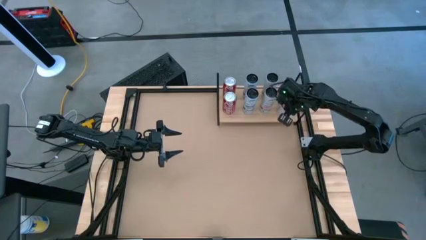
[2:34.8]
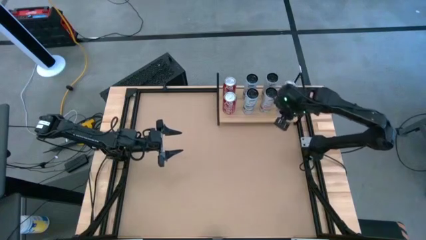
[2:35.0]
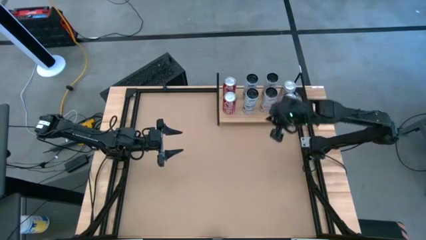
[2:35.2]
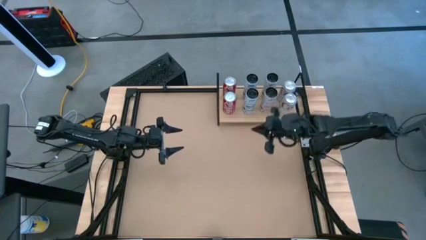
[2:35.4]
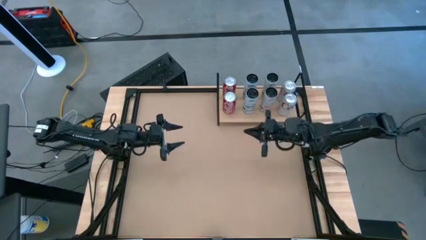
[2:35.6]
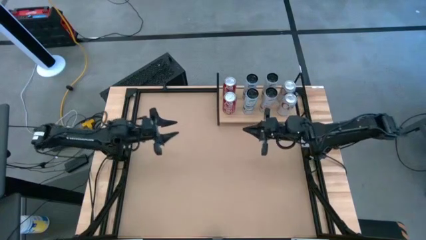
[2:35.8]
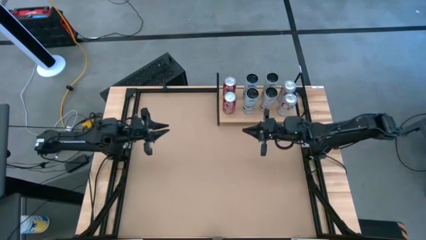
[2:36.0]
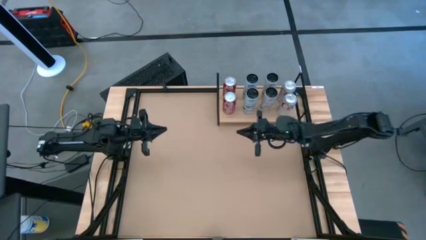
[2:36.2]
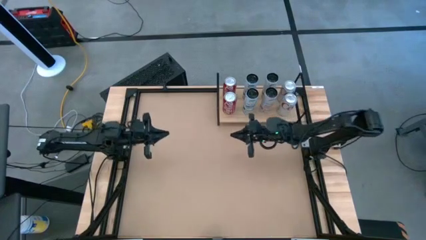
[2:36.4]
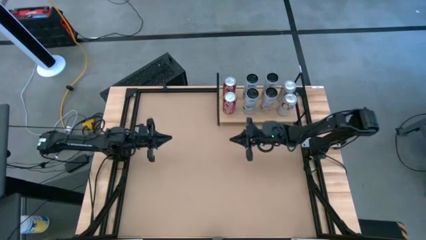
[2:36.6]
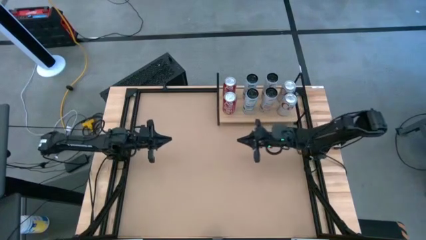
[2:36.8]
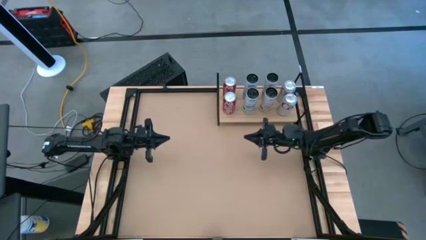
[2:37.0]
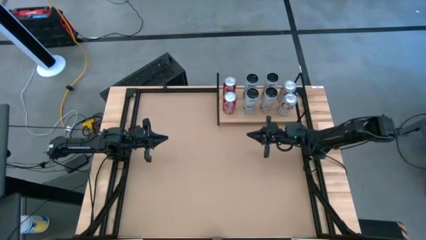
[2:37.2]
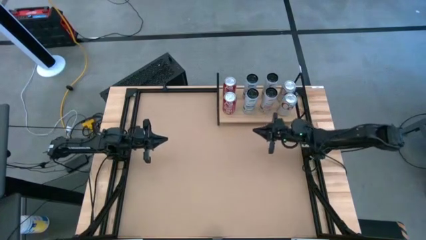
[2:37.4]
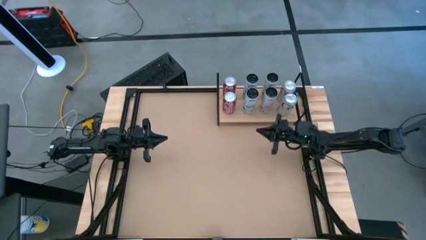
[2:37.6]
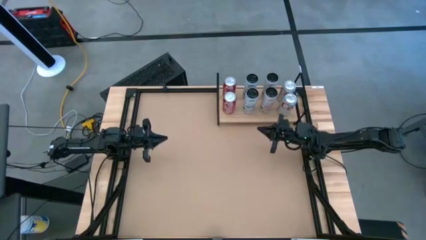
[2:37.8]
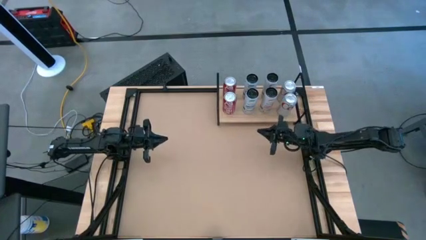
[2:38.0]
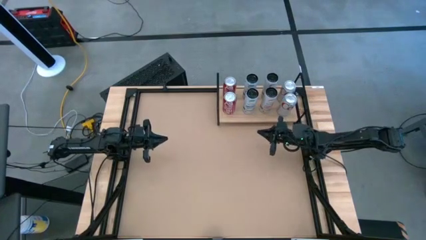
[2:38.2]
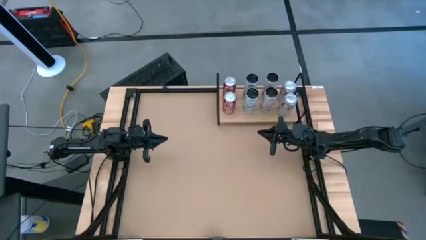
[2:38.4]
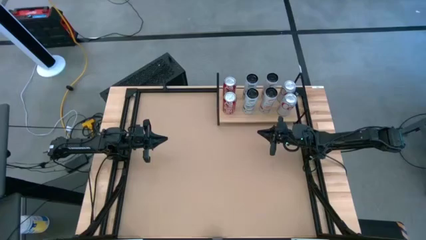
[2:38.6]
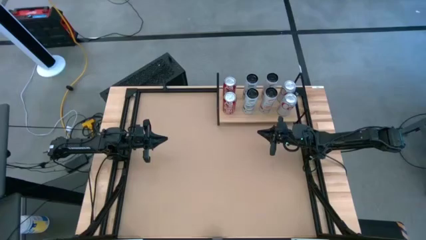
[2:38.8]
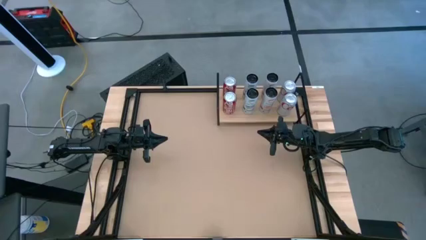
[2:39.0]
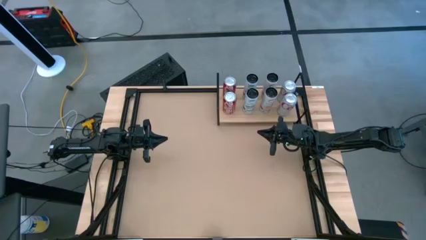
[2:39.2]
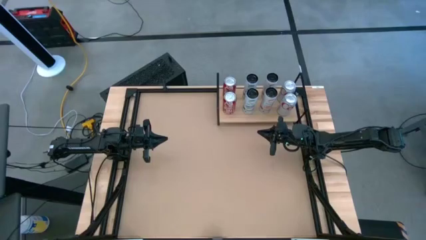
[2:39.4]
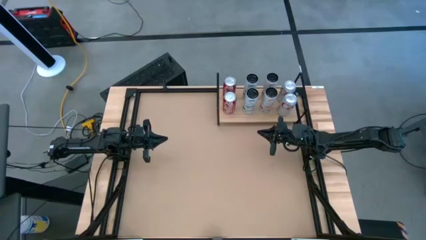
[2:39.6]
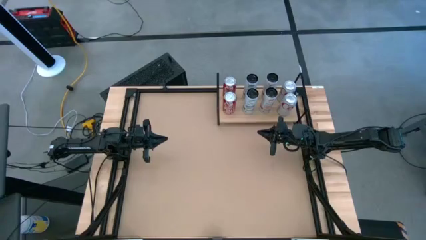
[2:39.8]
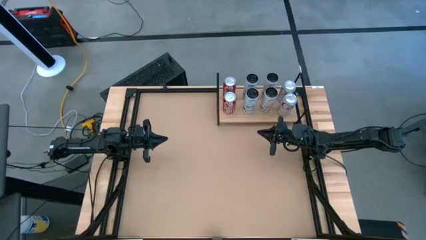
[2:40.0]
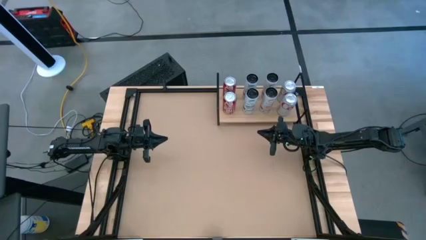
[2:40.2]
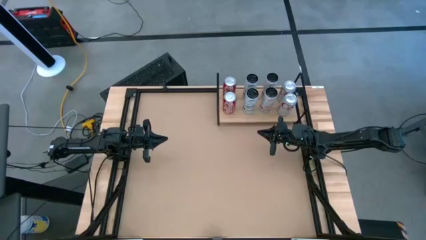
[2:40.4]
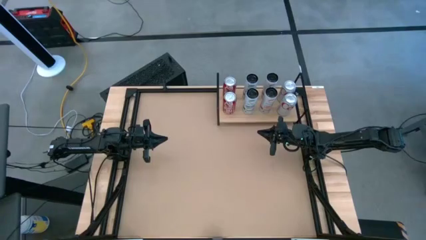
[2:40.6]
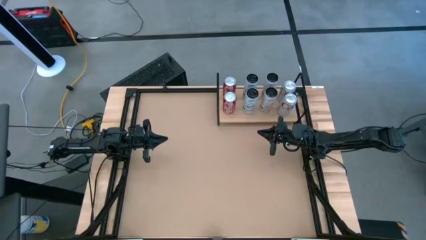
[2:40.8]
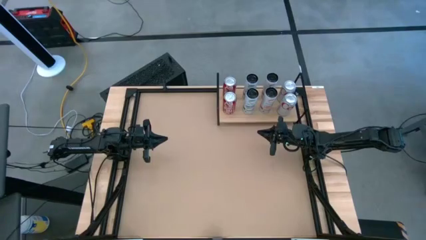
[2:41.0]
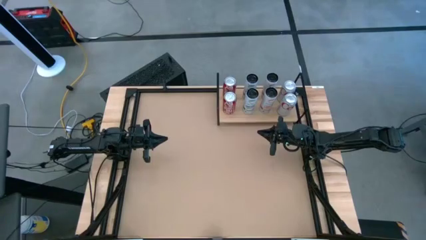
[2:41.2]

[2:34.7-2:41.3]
Task: Place canned beverage on shelf
Return to Home Position

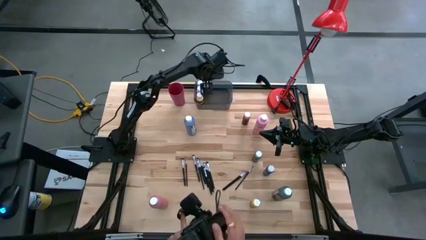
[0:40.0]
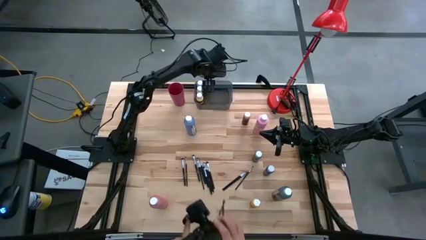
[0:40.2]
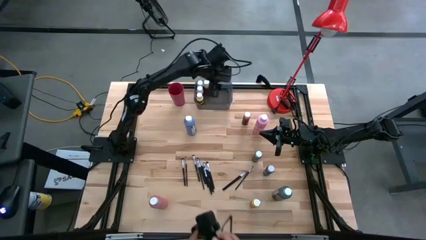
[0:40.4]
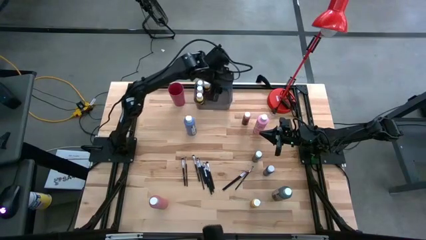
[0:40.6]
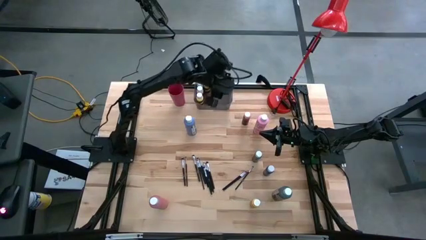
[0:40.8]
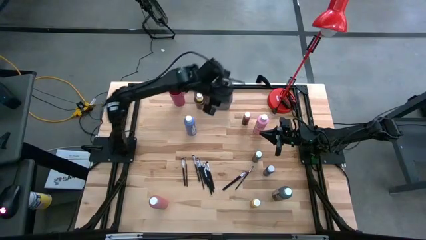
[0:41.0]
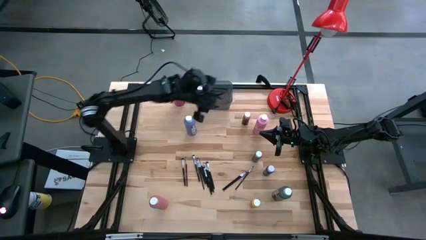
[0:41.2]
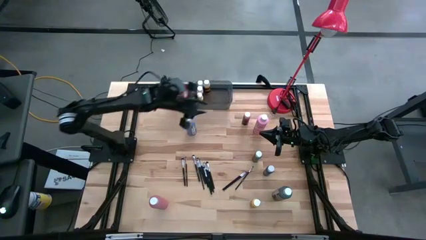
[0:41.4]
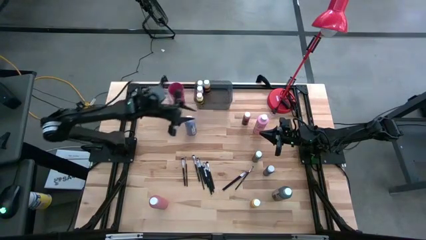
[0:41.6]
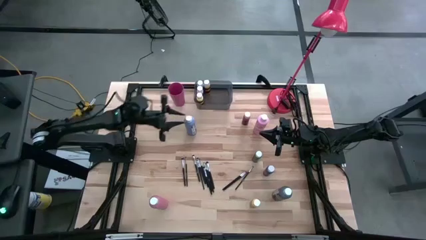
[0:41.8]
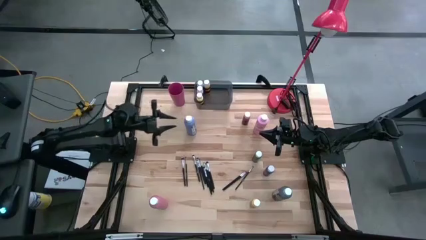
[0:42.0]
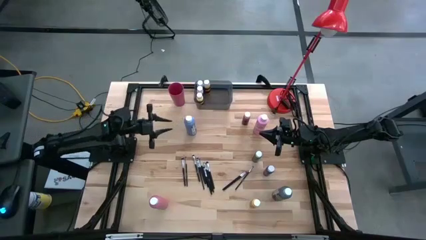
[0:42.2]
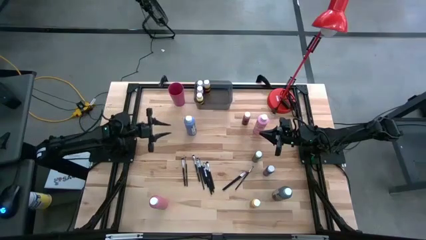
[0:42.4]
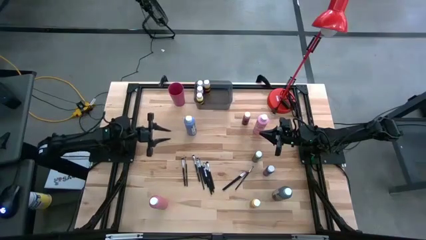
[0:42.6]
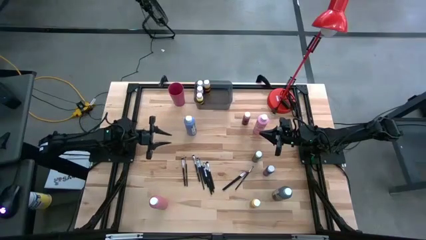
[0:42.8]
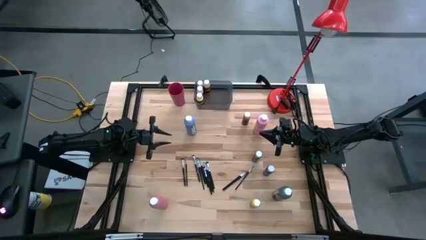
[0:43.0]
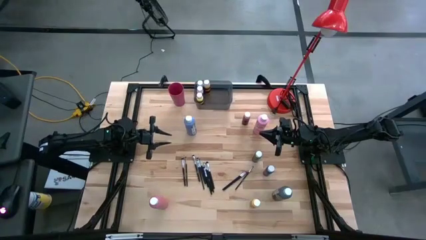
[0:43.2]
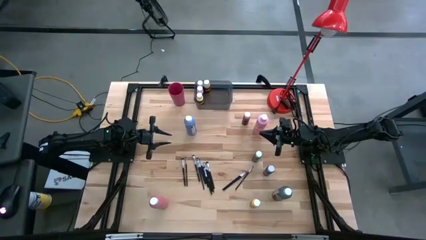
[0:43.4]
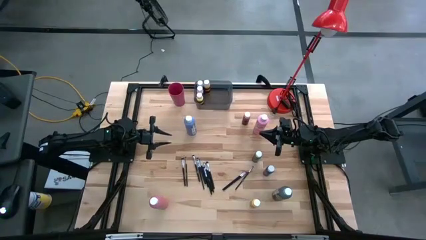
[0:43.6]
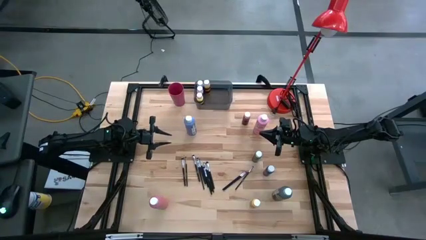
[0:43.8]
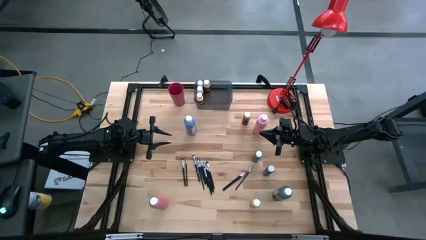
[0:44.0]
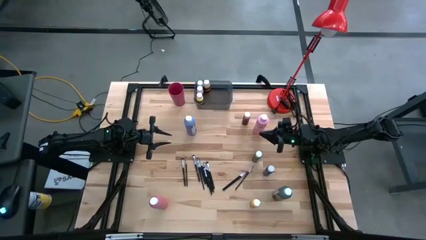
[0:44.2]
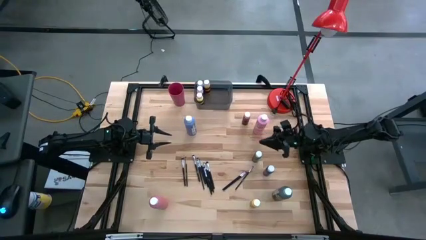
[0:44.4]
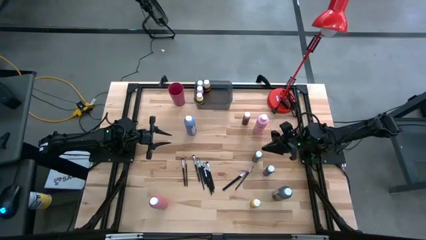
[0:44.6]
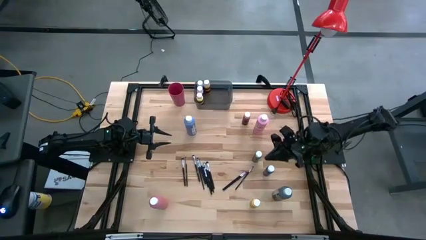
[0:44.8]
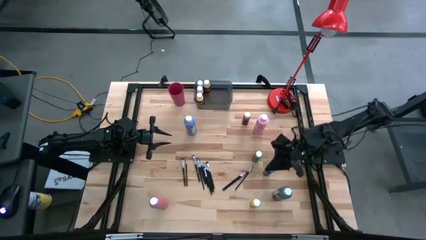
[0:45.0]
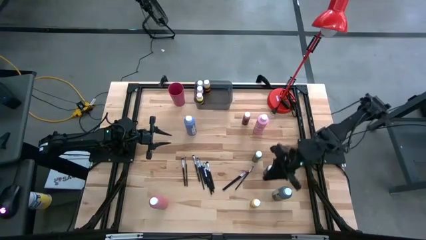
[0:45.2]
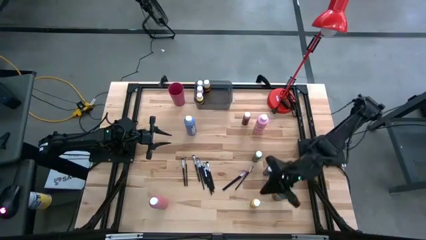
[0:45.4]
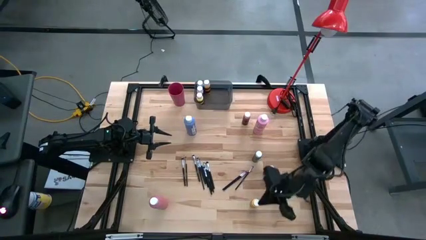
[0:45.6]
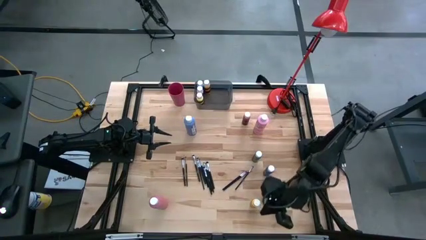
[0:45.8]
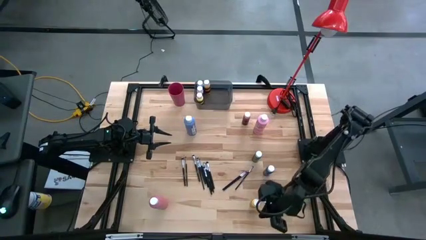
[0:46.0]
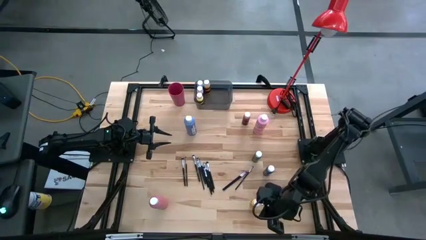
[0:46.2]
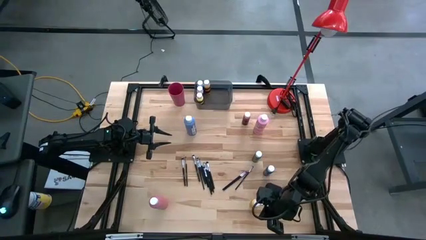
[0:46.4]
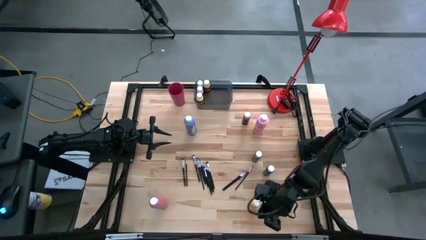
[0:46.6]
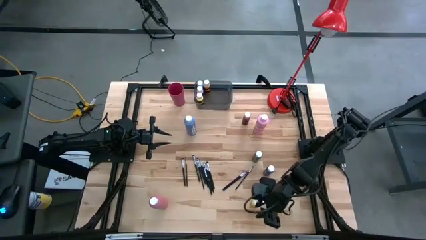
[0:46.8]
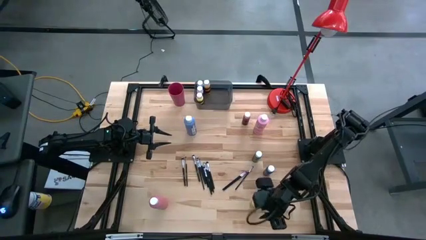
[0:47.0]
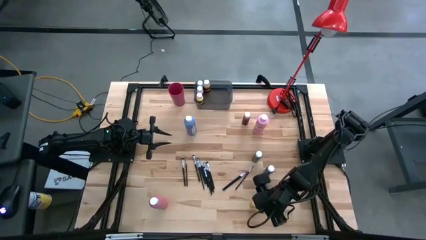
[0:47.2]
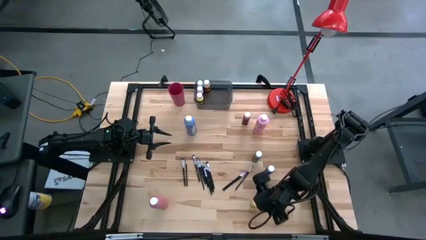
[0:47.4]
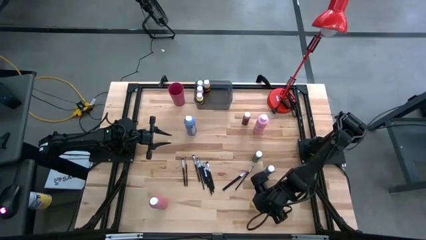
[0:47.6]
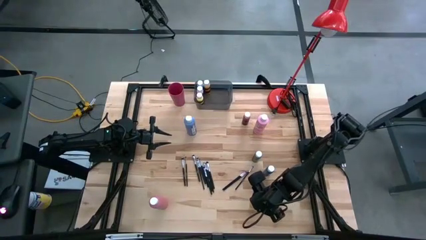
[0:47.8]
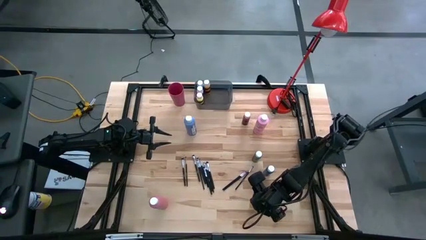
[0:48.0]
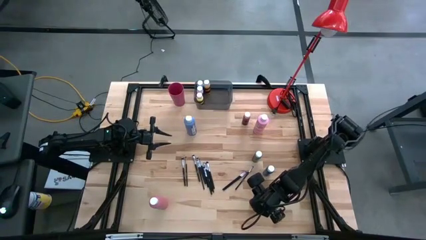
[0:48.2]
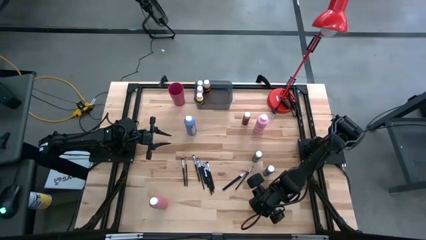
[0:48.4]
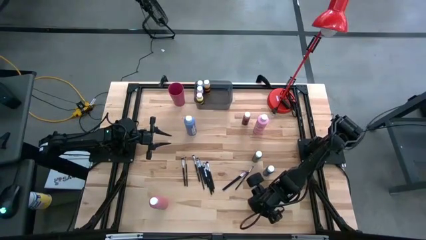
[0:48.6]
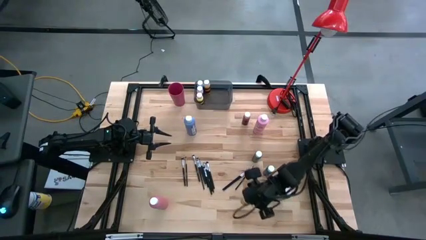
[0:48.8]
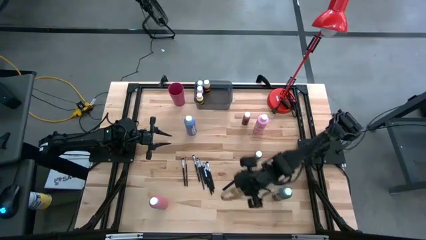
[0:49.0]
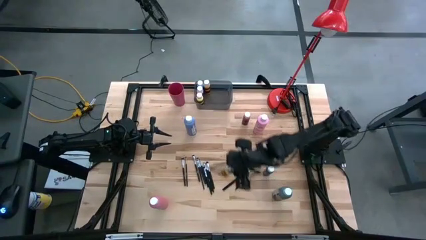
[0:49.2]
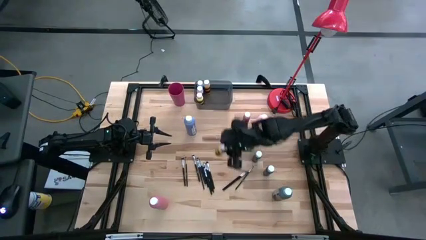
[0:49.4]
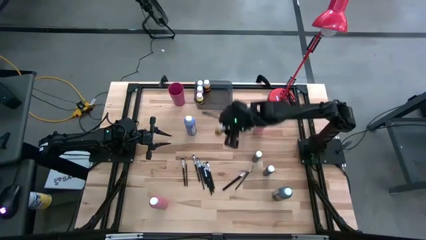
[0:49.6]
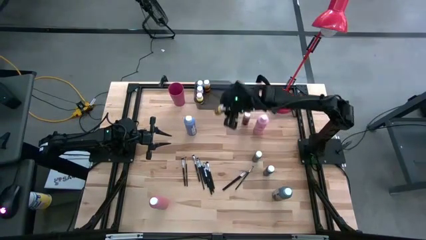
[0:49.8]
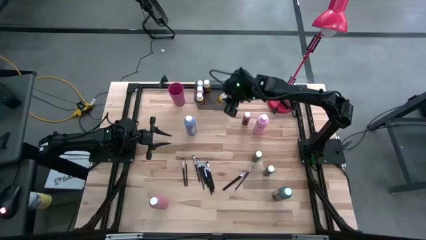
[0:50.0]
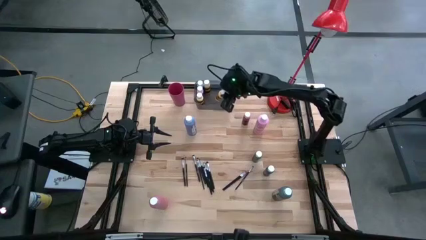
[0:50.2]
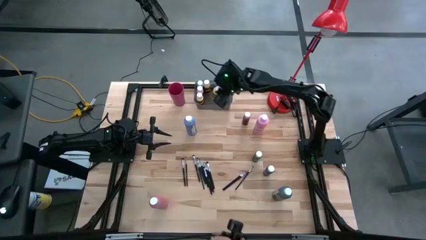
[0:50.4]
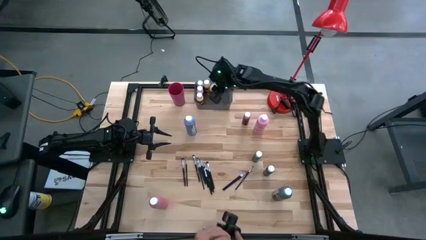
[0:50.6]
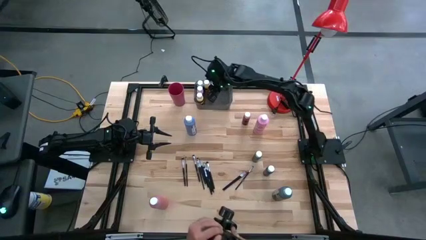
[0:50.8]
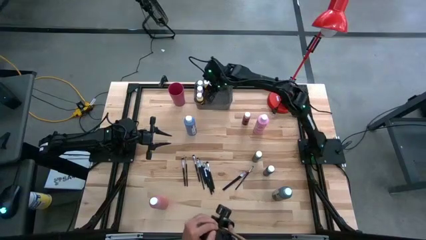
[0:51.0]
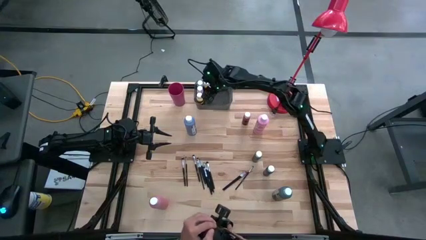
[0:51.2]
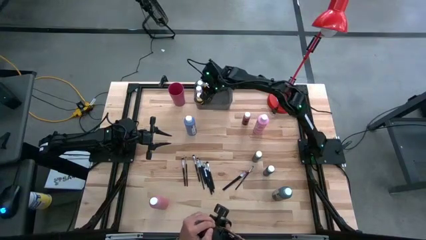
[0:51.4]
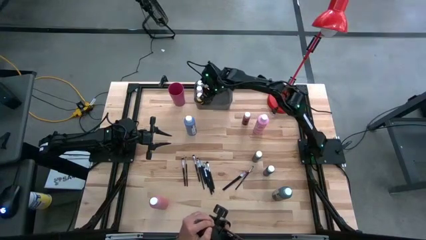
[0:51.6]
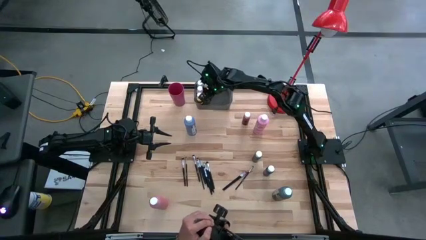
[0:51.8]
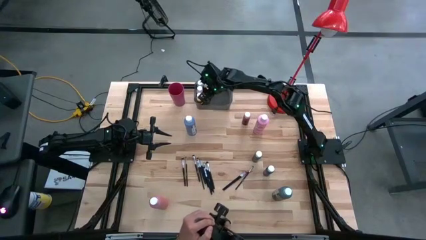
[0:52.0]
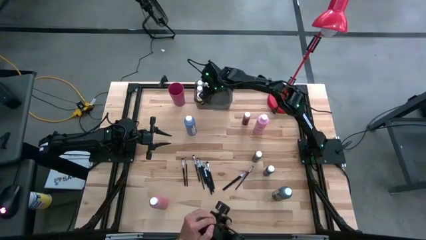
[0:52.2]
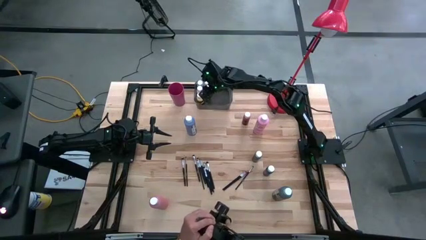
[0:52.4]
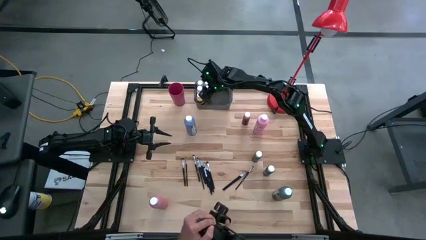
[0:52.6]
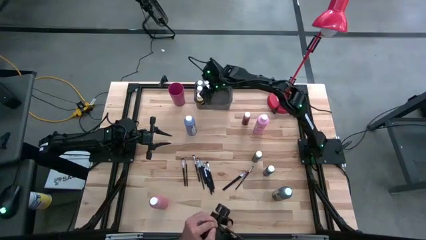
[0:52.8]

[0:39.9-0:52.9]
Task: Pick & Place Paint Supplies
Put the dark yellow paint bottle into the black bin
